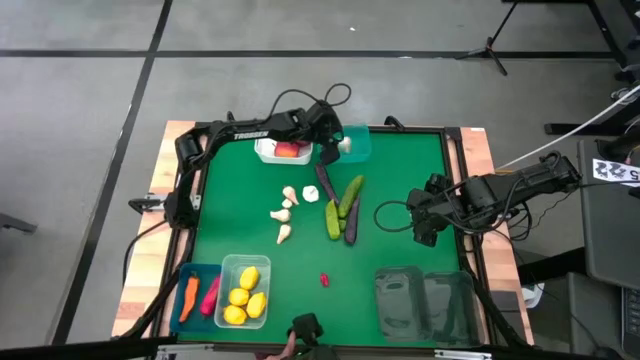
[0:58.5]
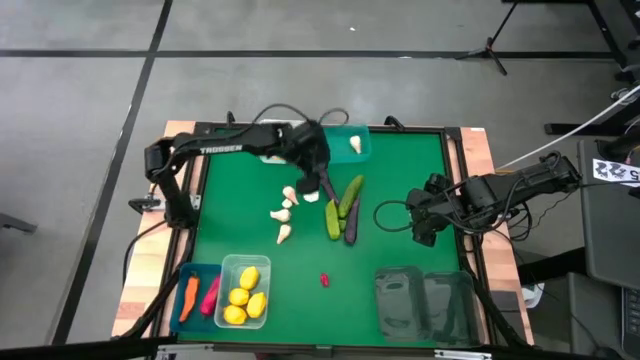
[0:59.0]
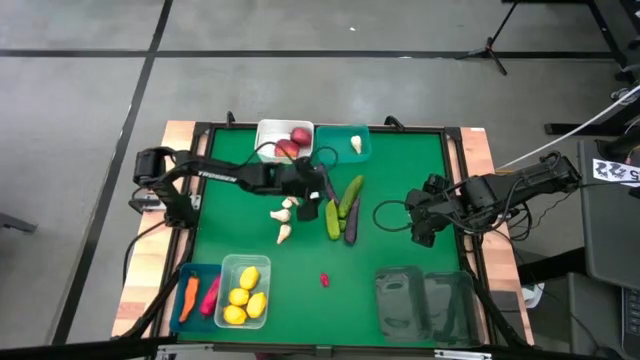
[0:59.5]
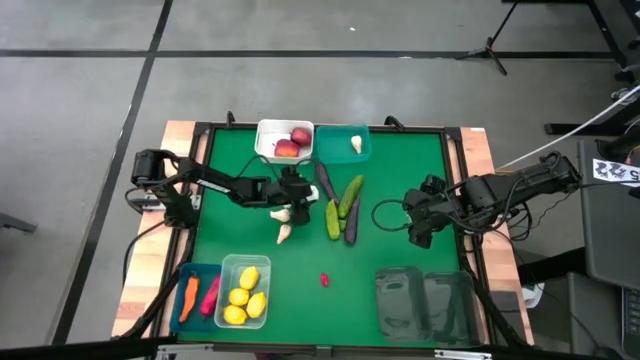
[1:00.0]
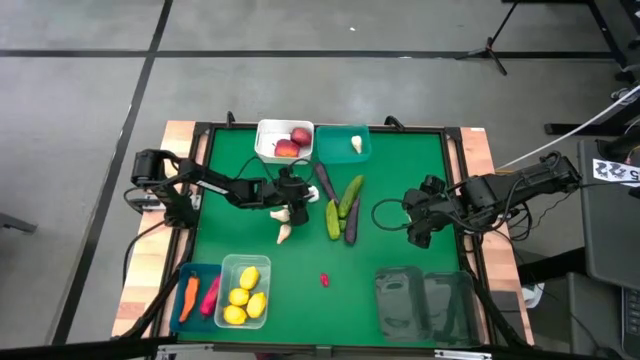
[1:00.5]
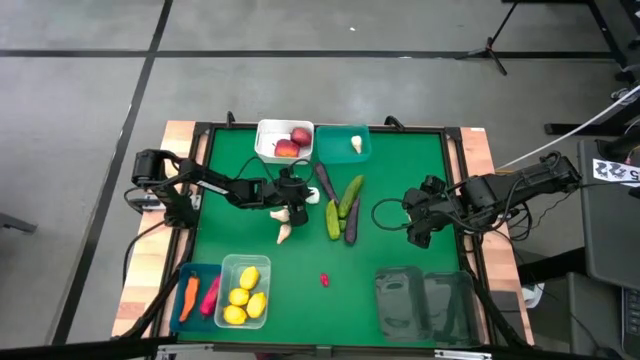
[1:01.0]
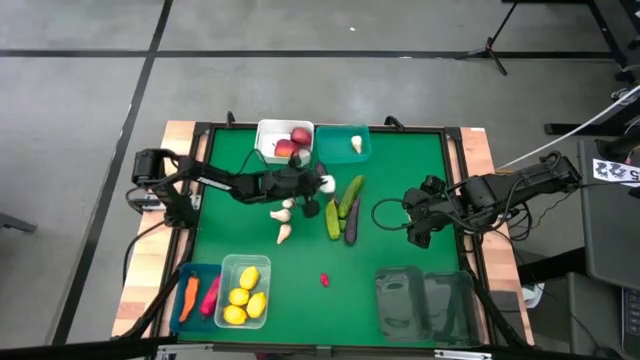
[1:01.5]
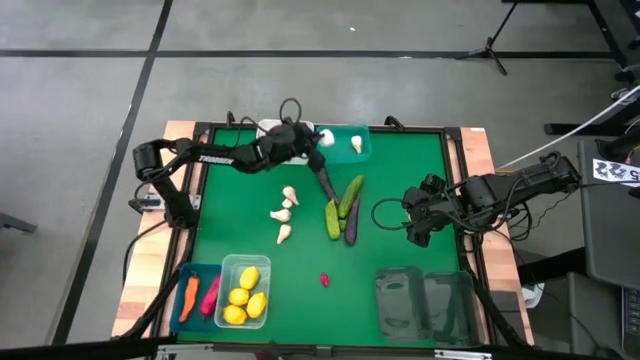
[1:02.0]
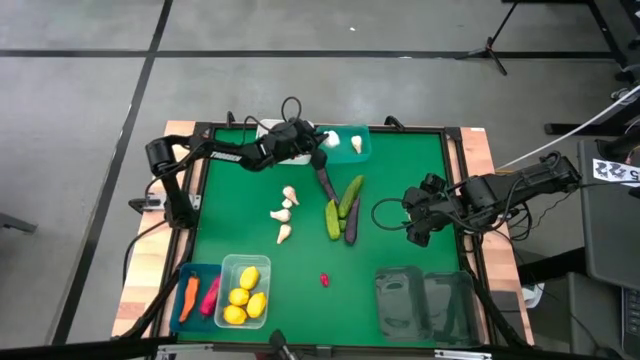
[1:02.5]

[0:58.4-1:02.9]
Task: Sort produce into baskets
Put the white garlic into the green bin

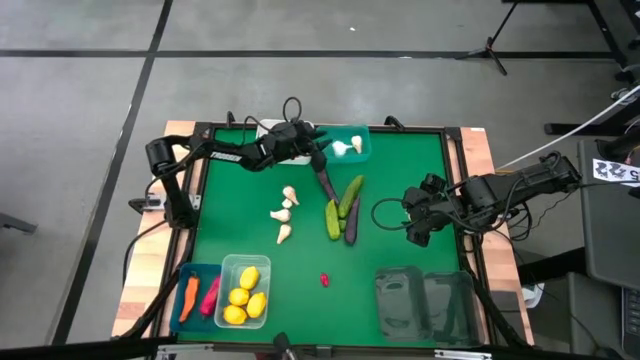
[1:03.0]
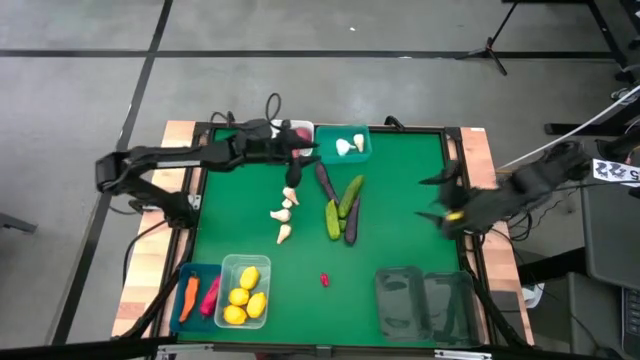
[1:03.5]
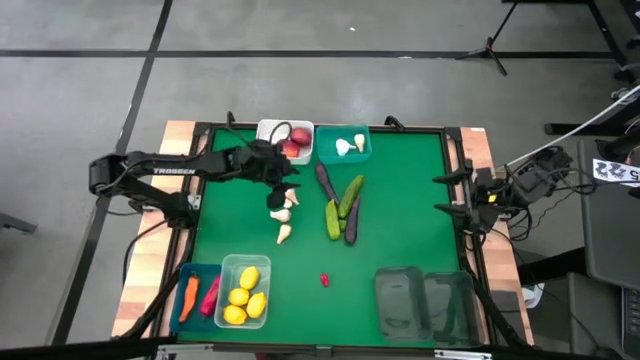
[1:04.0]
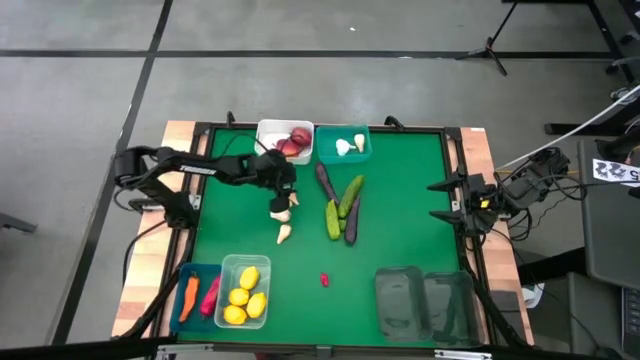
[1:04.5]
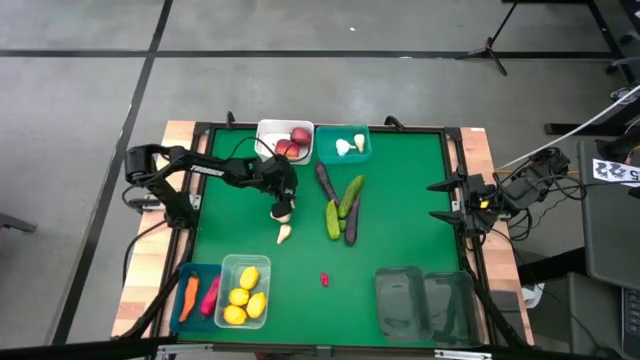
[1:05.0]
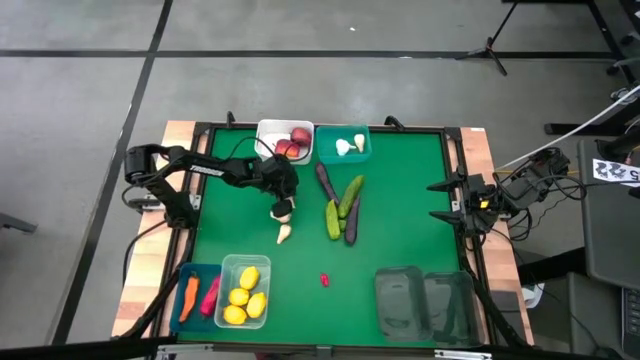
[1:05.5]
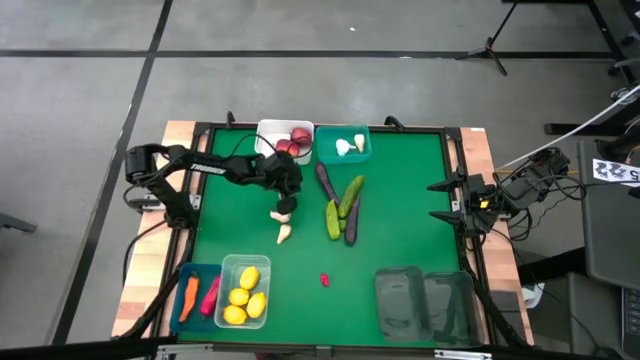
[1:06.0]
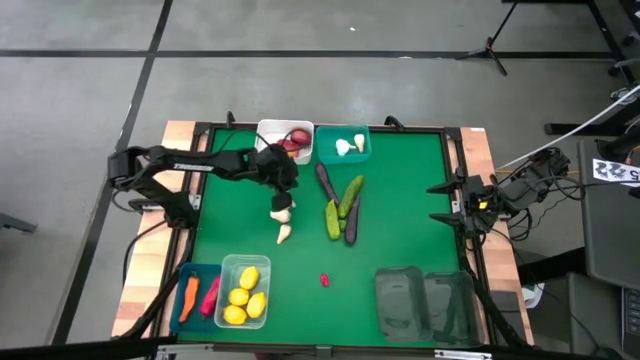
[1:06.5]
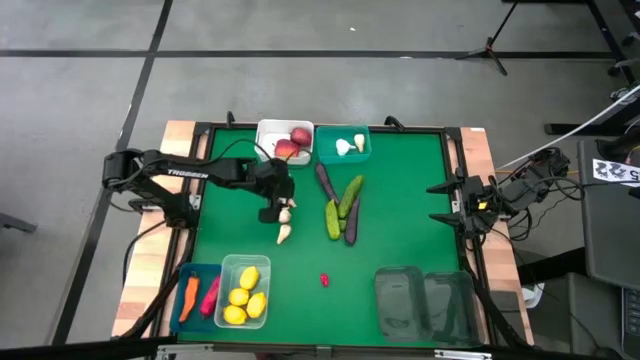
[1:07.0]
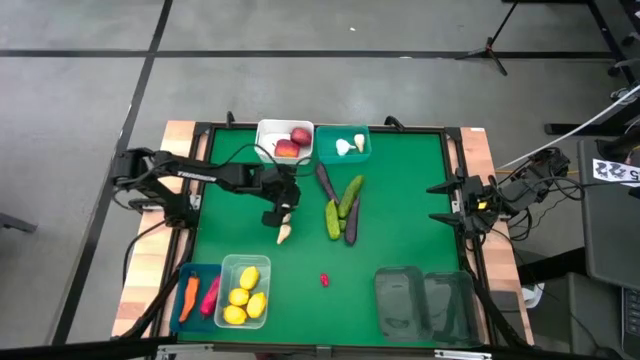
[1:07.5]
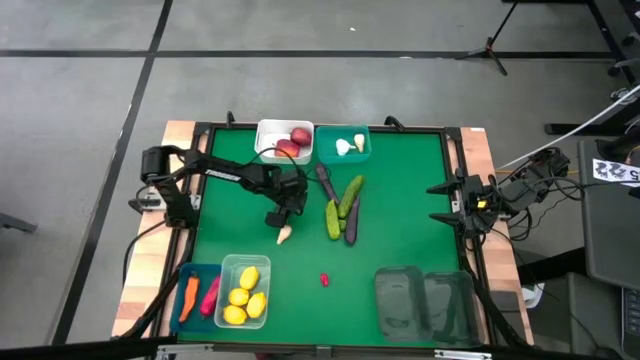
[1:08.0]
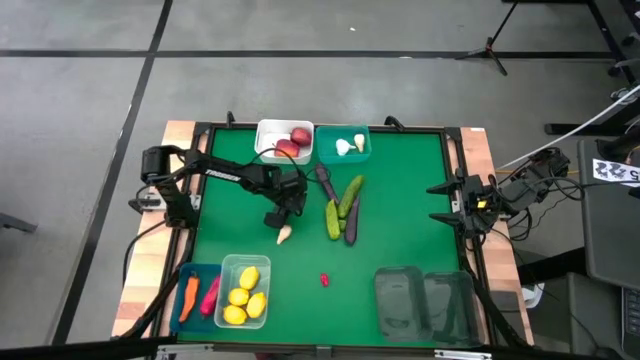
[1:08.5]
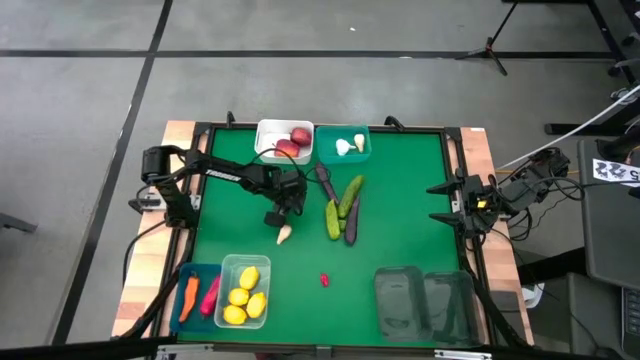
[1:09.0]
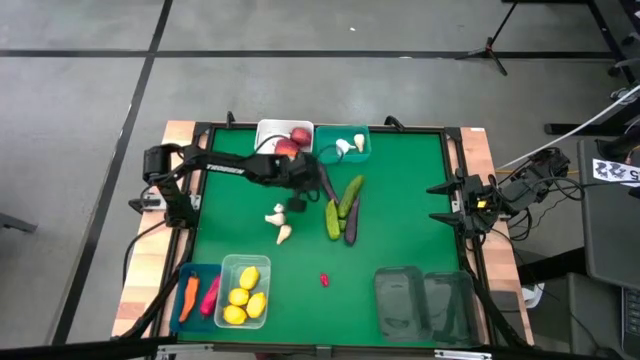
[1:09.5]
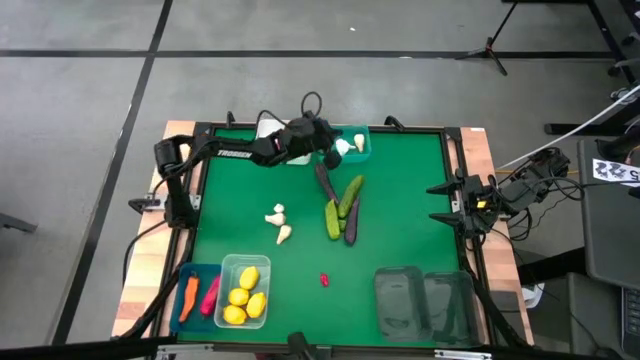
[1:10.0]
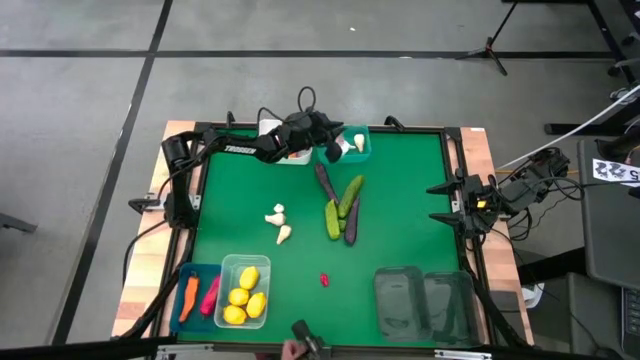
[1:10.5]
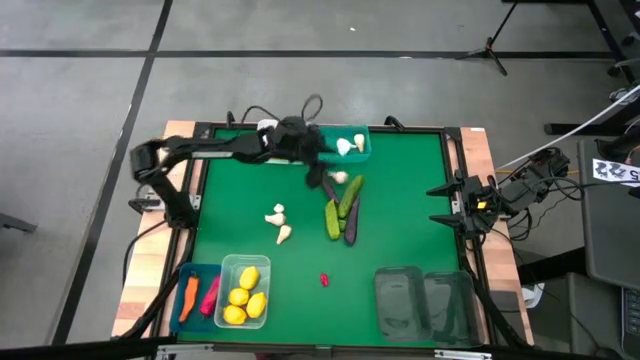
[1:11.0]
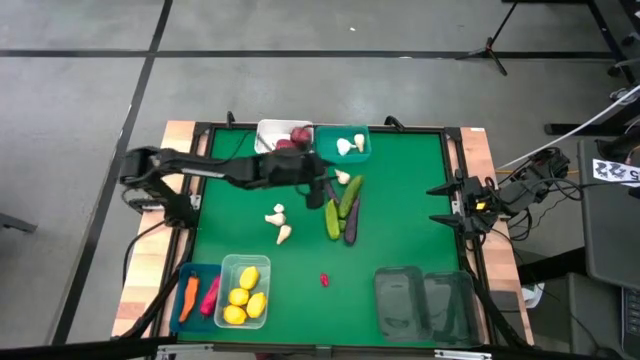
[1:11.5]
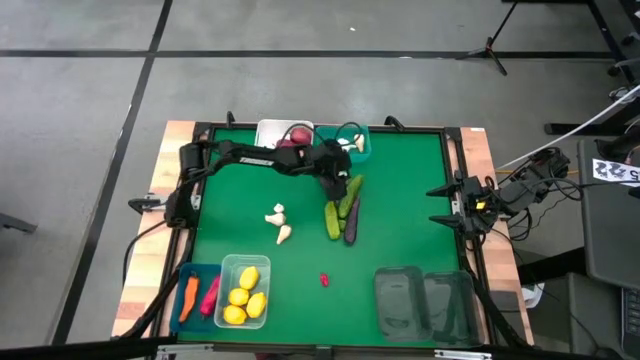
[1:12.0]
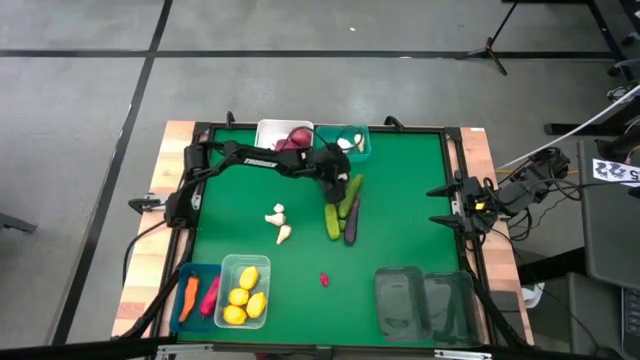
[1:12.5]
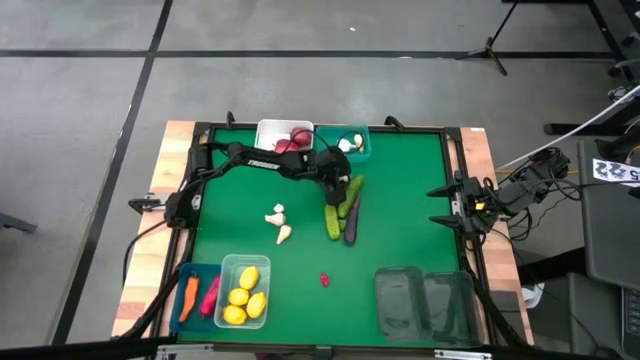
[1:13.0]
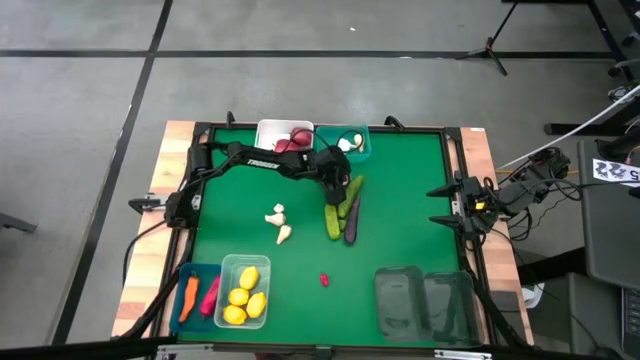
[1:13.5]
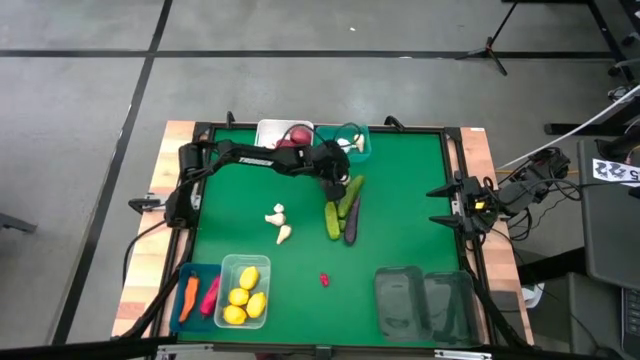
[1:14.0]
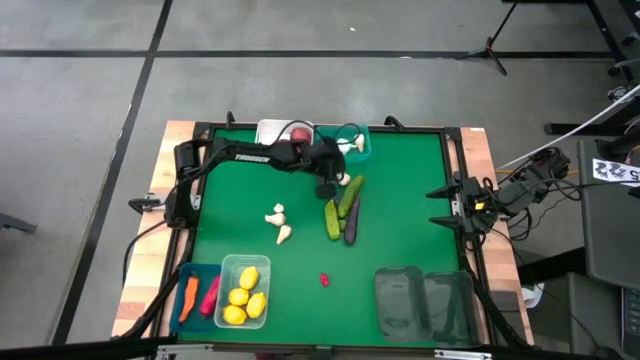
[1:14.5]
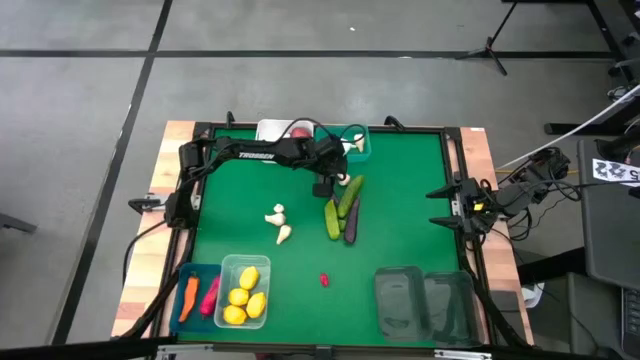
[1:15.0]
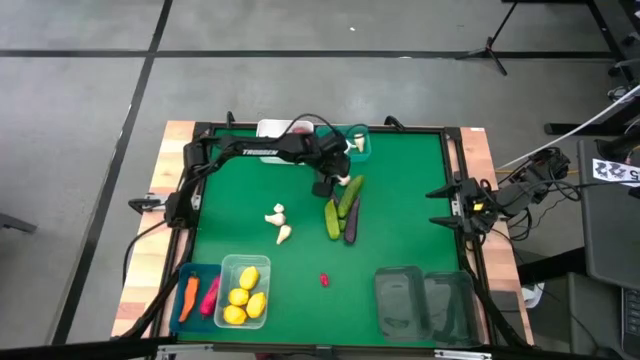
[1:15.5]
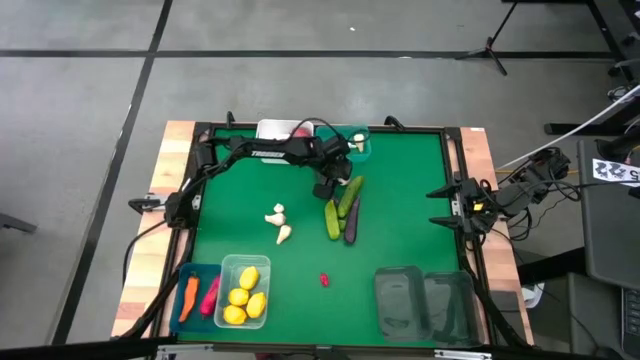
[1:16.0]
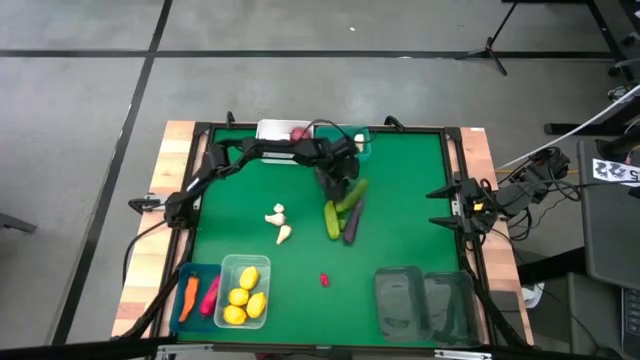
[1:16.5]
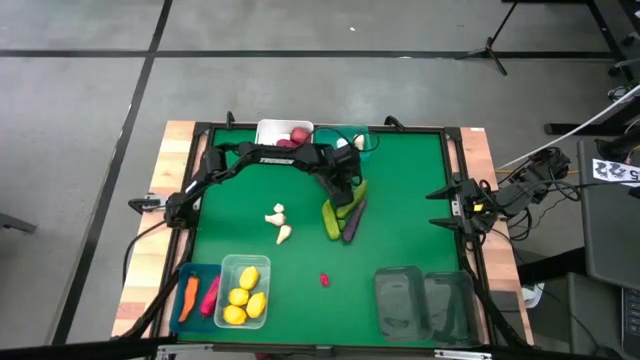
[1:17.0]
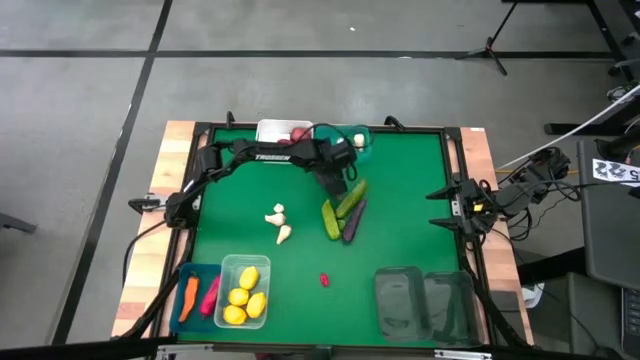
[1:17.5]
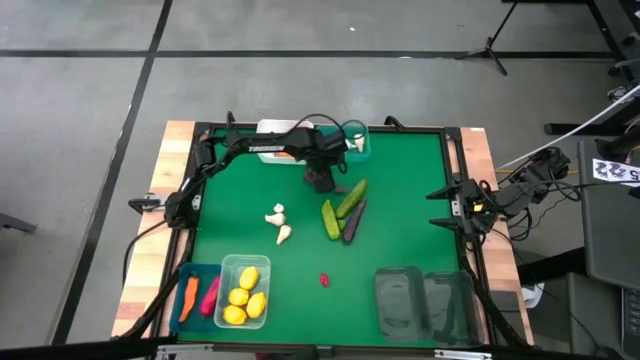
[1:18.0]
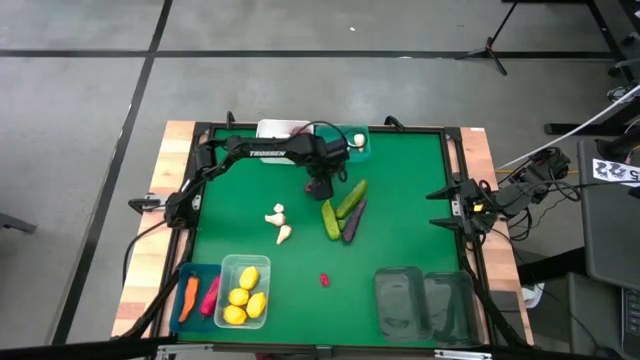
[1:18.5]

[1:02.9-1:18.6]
Put the white garlic into the green bin

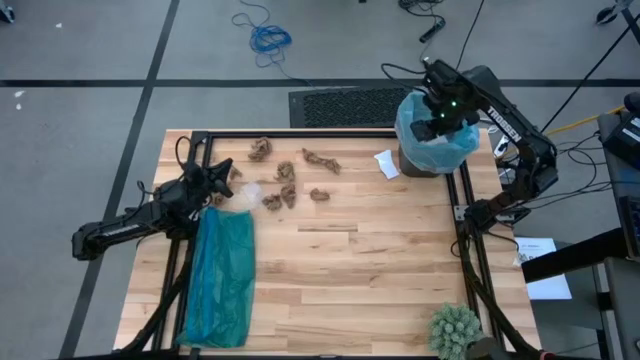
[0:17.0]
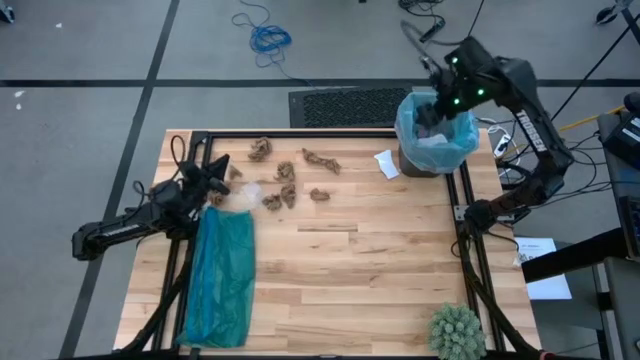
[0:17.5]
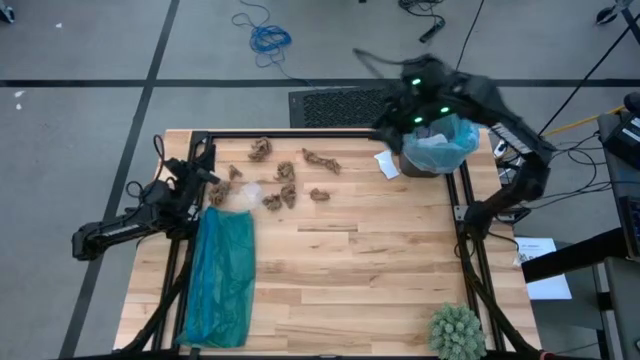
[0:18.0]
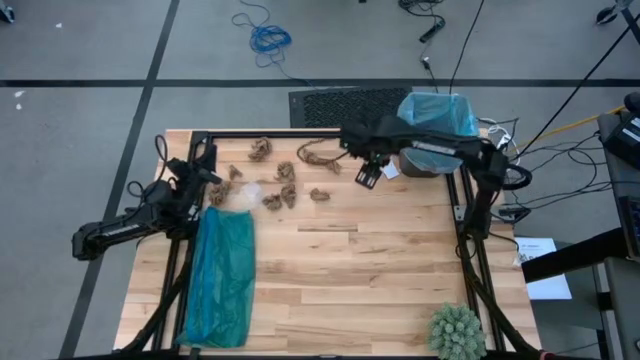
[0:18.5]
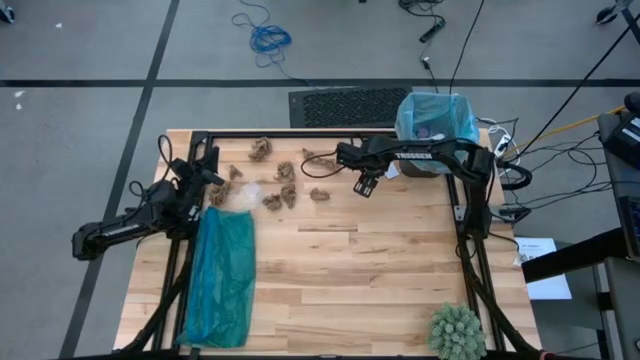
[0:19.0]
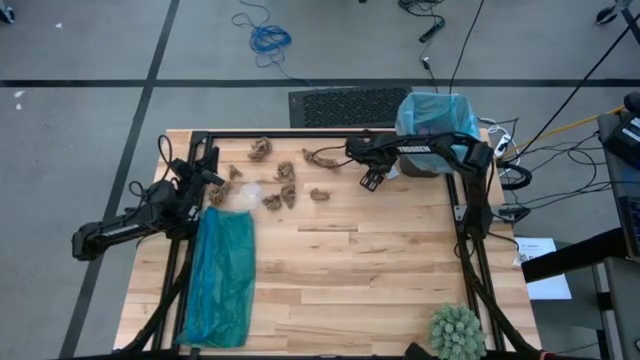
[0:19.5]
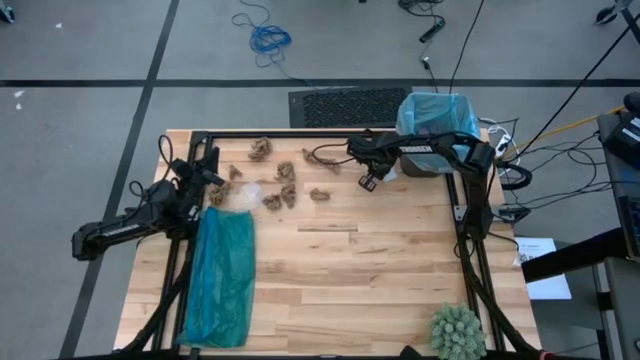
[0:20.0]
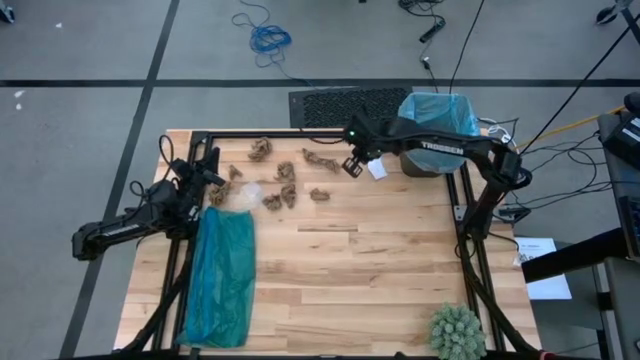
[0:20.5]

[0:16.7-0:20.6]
Task: place trash/remove bag and relplace
Put the white paper into the trash bin
